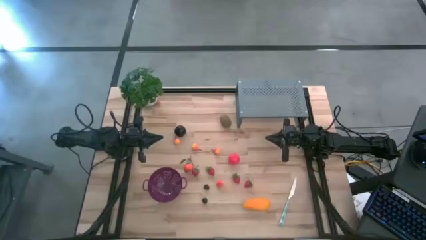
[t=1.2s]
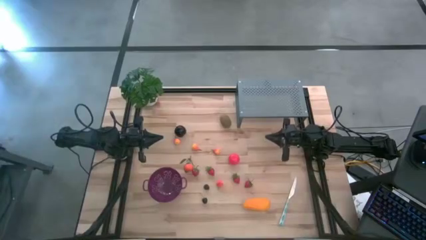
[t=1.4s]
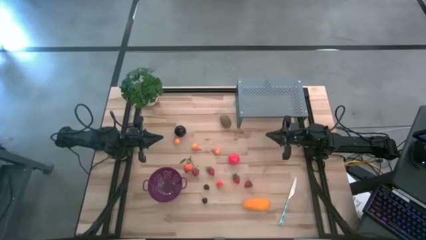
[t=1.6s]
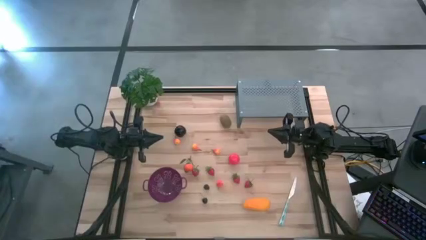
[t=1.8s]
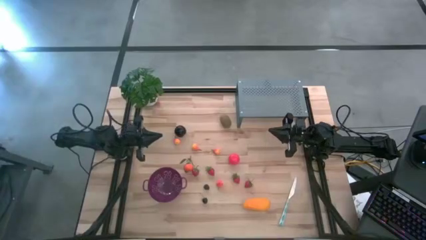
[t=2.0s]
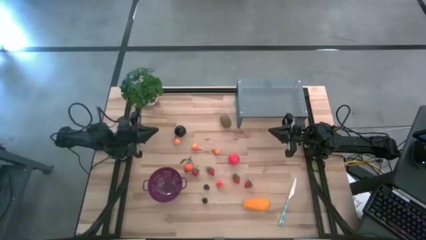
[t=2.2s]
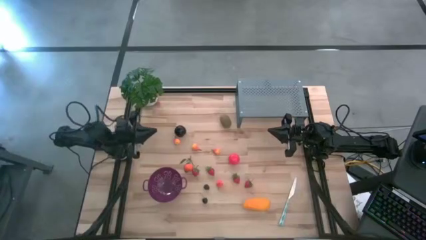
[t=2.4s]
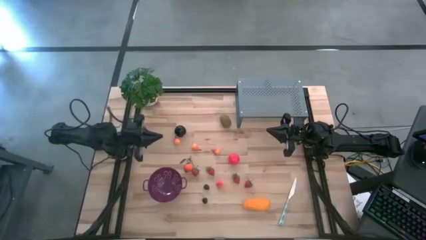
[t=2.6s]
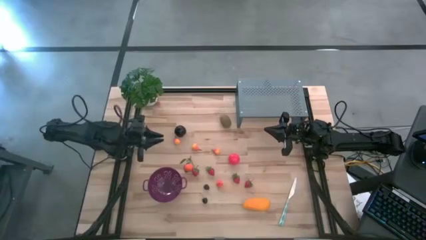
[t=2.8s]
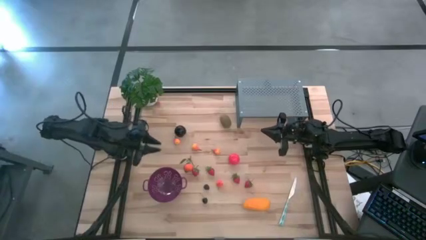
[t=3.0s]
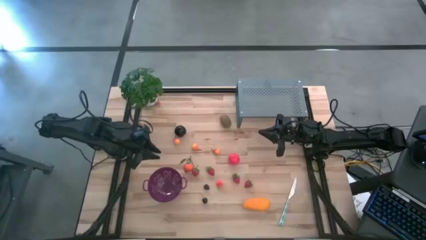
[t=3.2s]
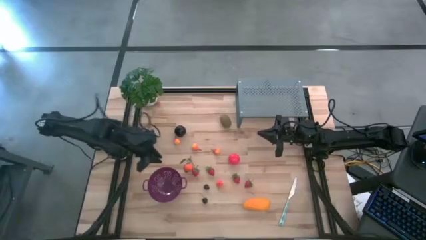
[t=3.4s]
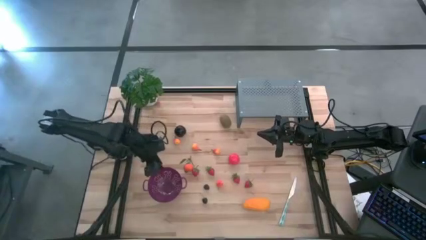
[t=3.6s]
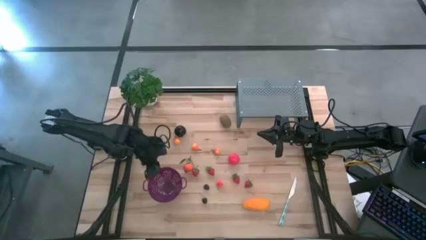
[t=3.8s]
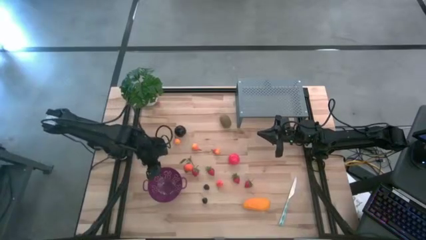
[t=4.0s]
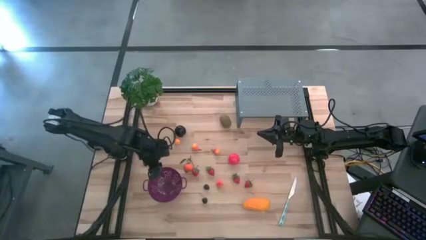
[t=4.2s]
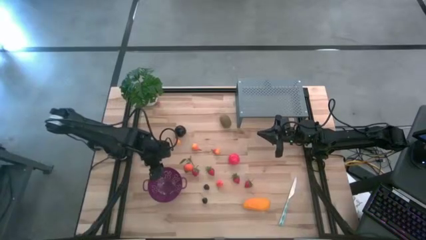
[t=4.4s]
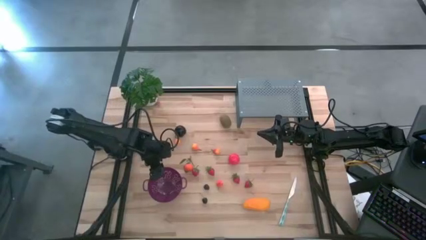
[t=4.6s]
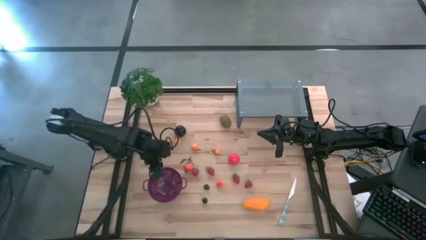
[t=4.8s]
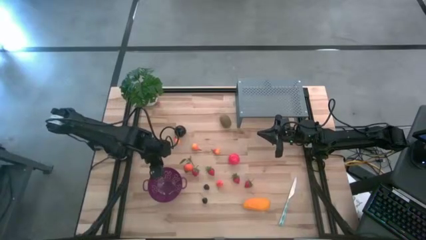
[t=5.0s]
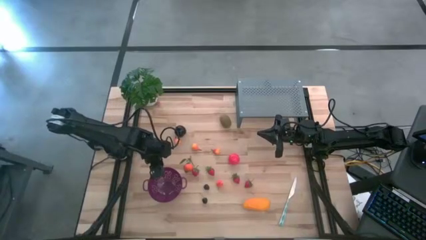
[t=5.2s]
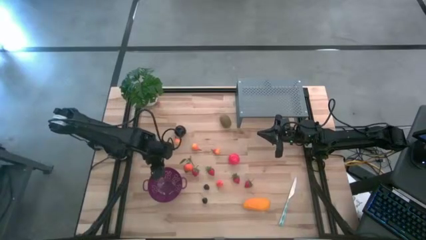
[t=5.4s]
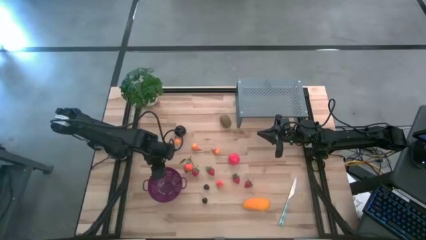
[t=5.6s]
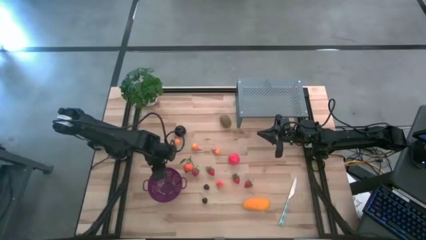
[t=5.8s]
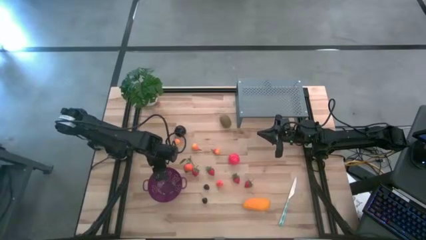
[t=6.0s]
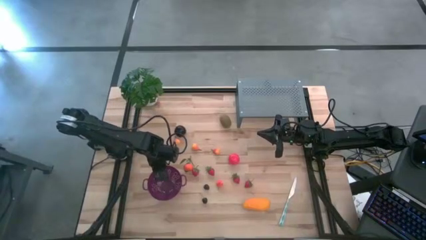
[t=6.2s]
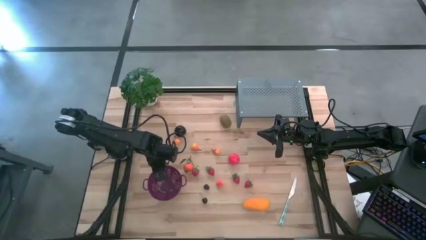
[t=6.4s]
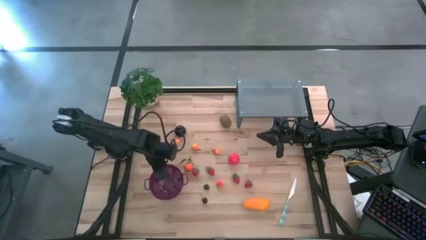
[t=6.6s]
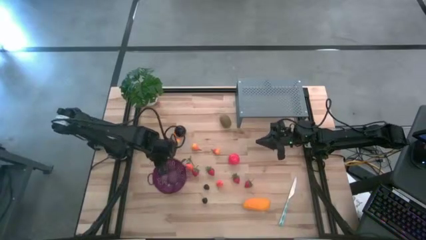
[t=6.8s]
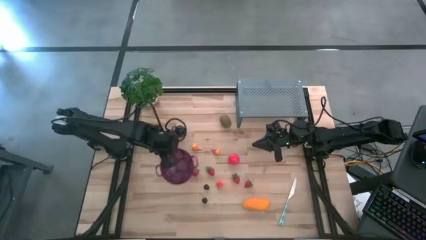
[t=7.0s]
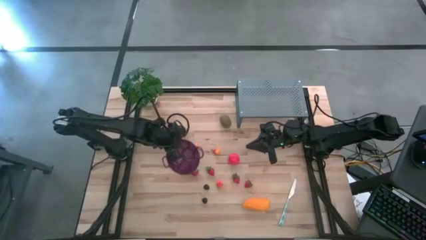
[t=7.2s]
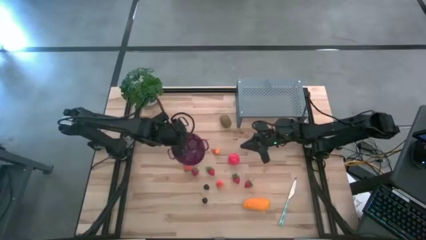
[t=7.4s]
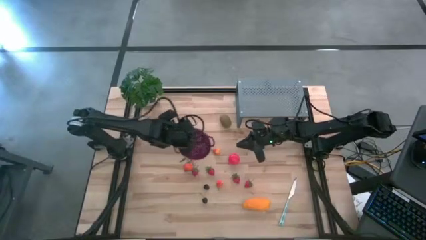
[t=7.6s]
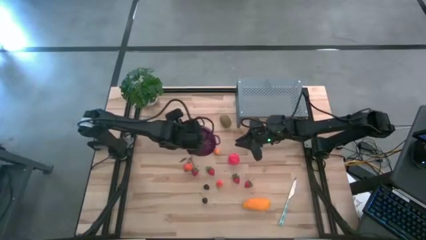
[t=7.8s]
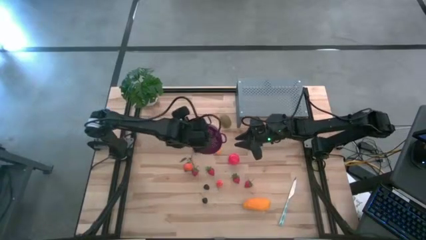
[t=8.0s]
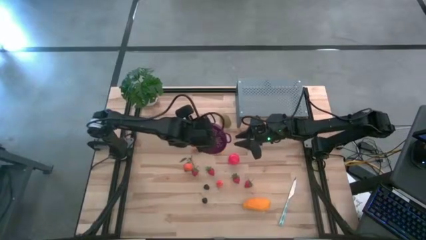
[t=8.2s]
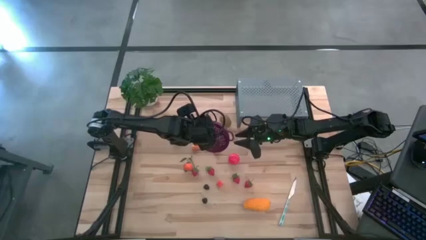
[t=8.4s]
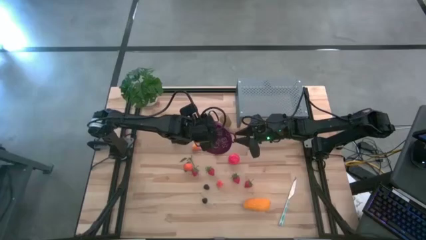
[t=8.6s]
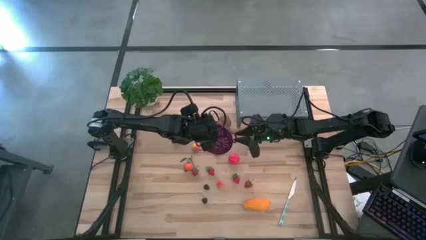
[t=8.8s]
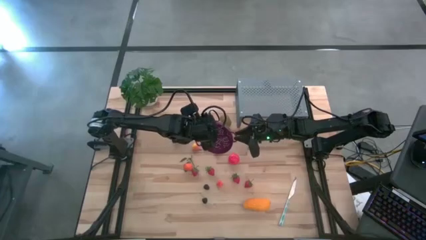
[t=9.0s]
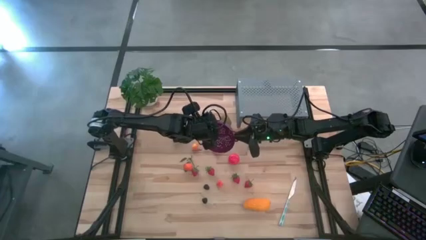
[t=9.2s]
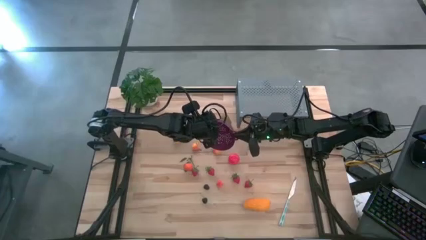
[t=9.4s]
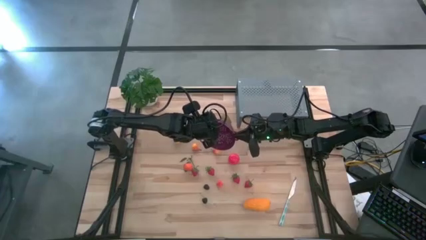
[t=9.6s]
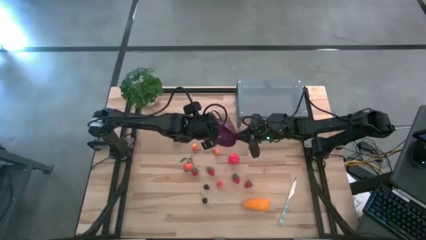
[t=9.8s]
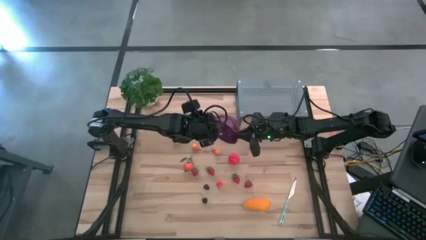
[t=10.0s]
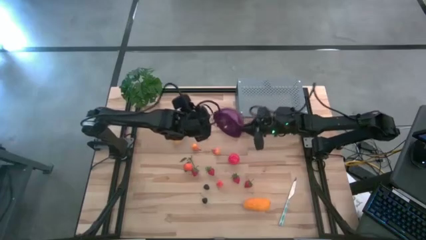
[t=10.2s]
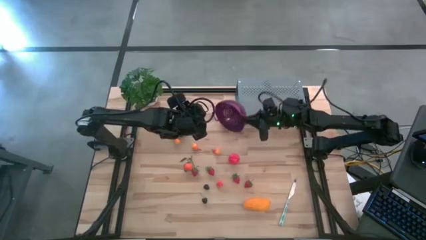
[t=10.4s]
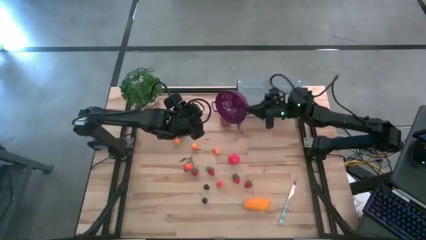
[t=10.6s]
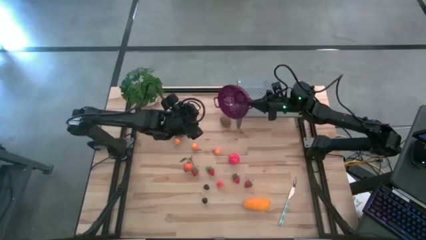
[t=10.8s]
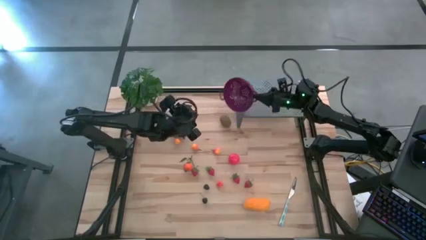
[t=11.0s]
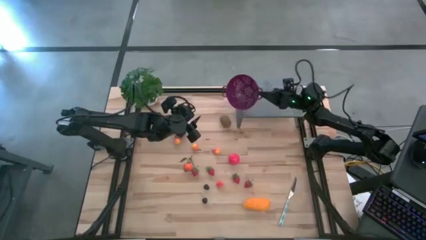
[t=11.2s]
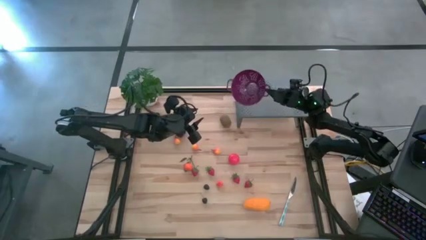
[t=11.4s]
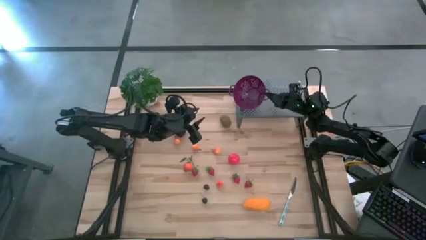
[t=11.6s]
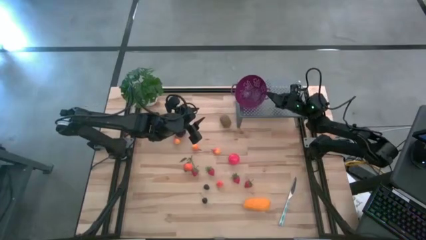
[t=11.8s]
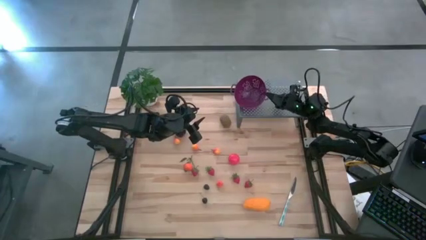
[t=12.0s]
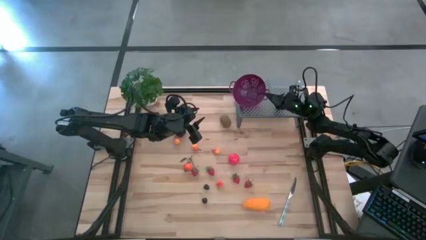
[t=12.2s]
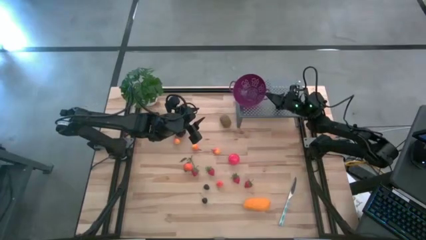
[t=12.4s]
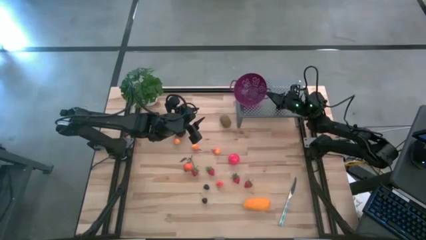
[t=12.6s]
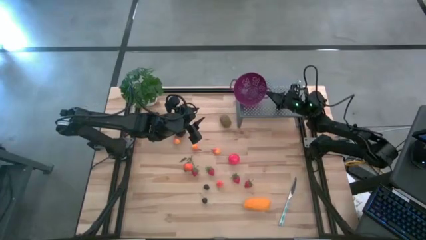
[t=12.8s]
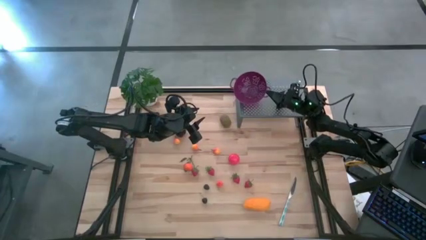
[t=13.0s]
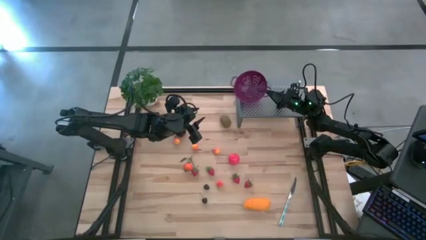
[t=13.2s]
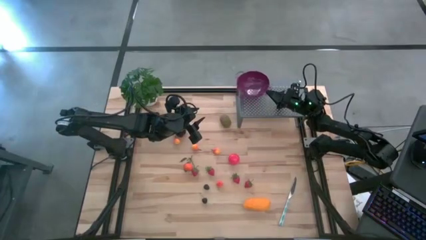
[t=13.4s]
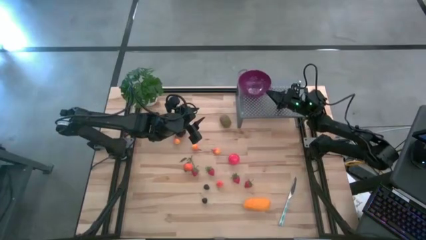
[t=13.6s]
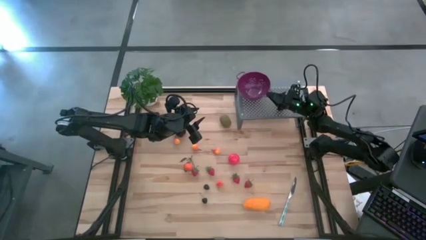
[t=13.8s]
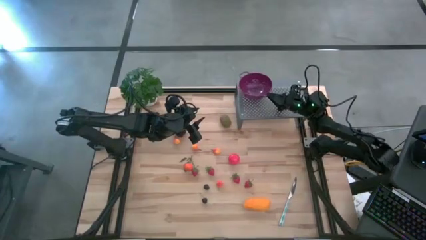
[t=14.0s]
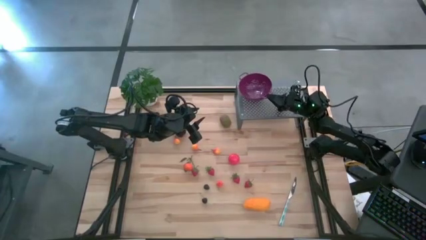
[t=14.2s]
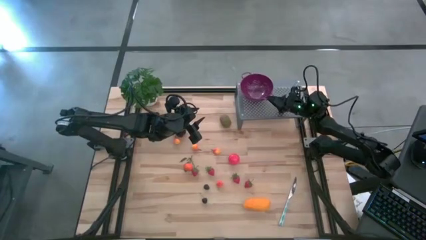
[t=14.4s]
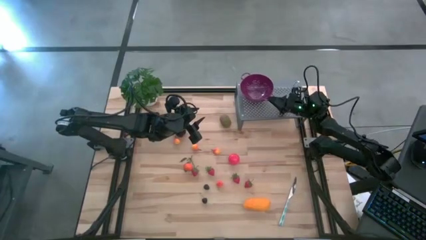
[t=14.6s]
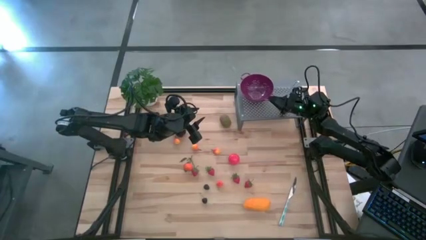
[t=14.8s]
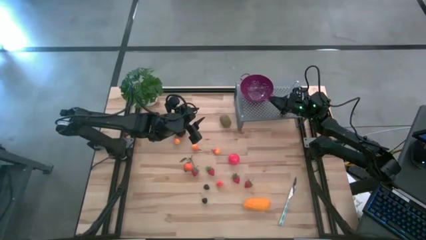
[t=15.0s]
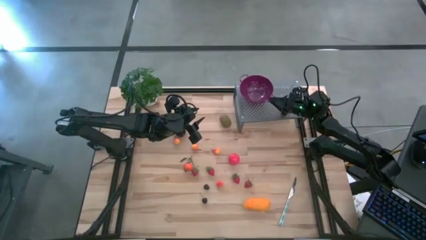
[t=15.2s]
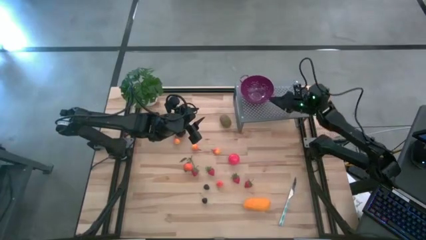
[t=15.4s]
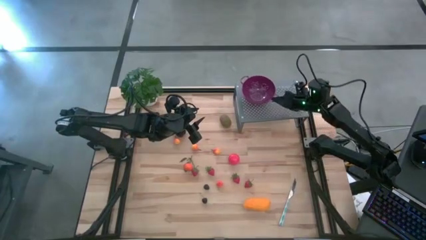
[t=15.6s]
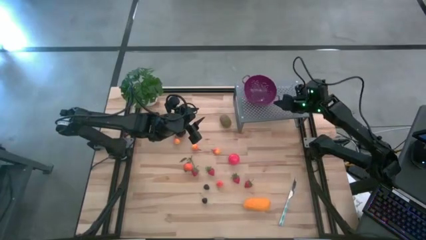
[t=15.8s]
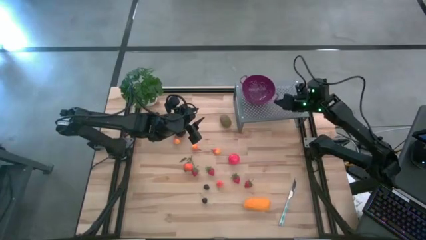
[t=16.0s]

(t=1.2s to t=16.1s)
Task: Pick & Place Fruit
Put the violet strainer bowl on the shelf
